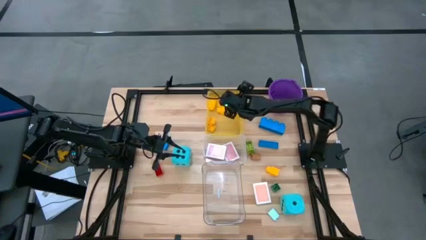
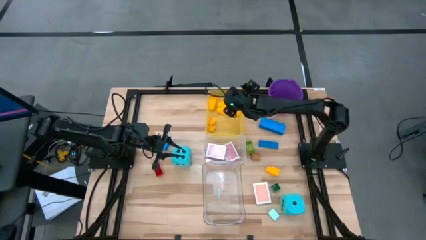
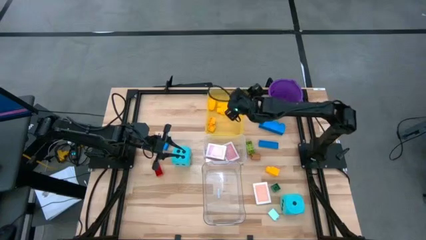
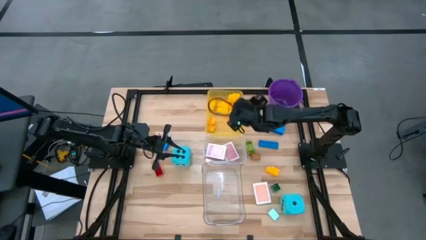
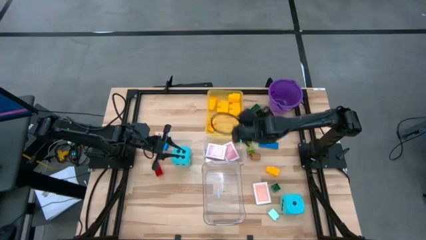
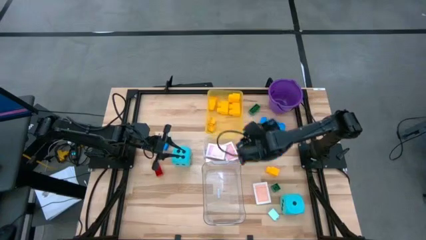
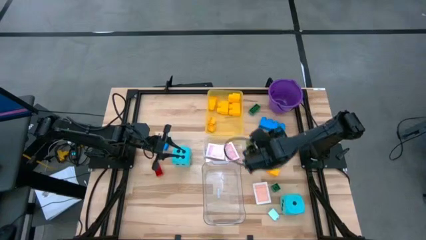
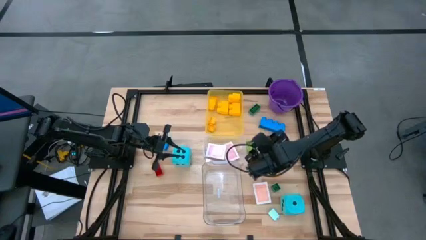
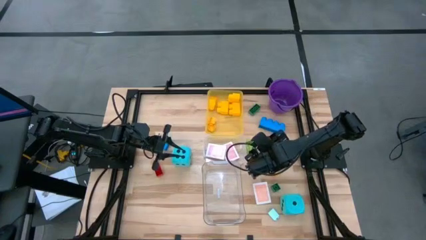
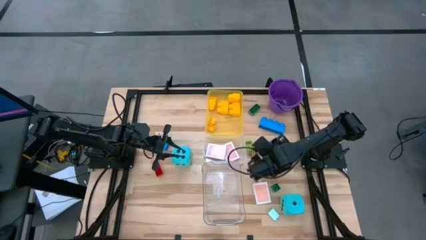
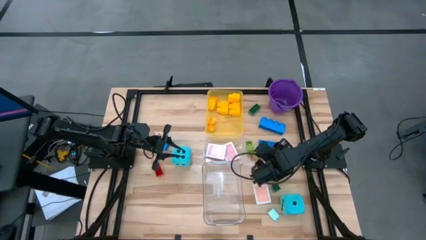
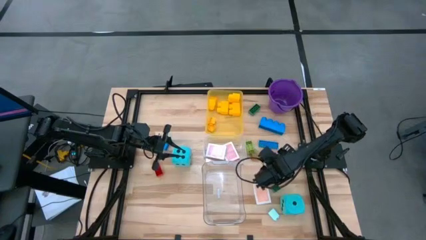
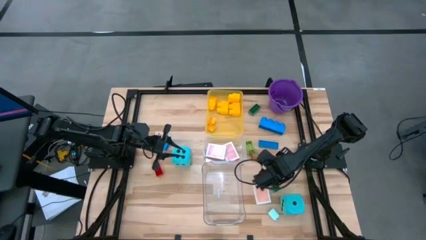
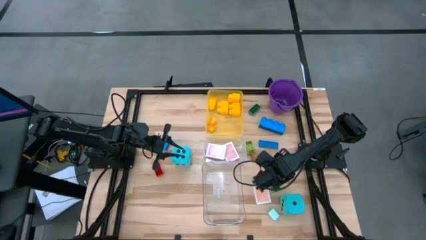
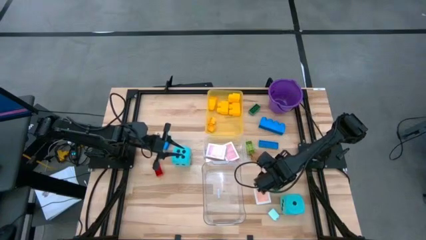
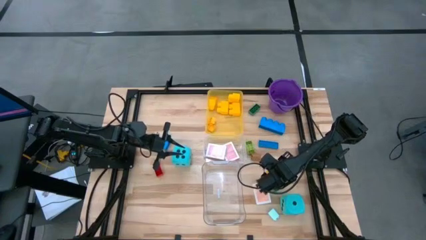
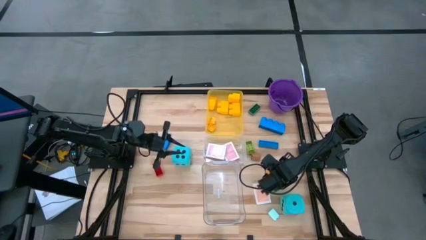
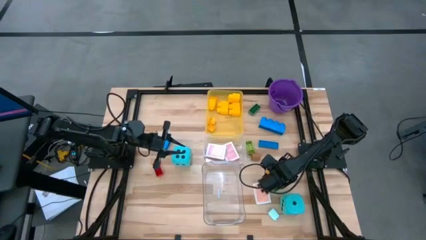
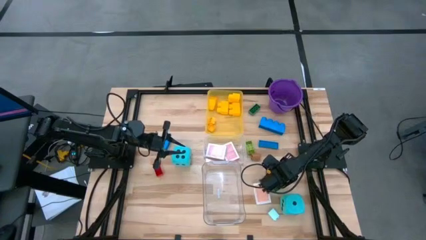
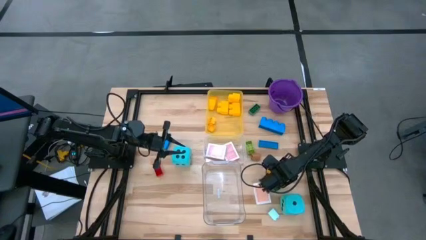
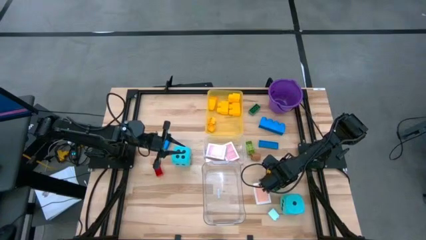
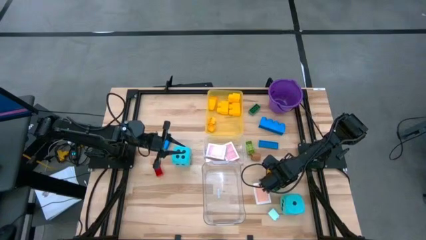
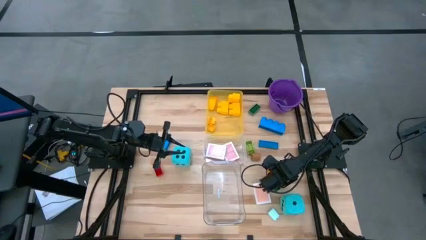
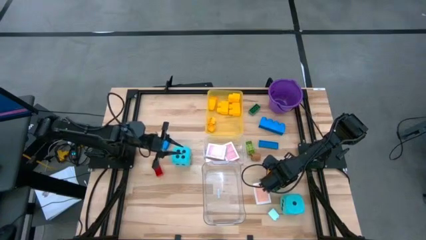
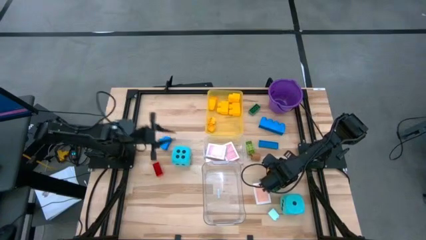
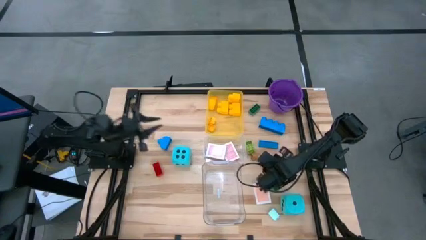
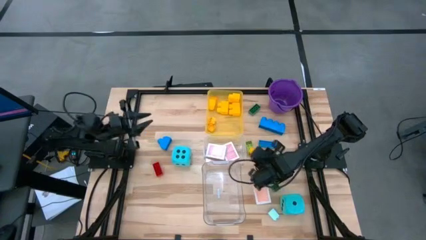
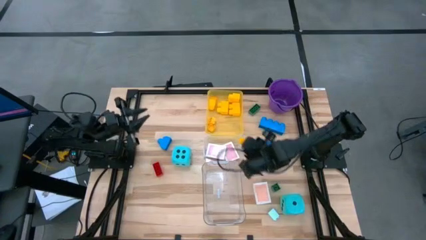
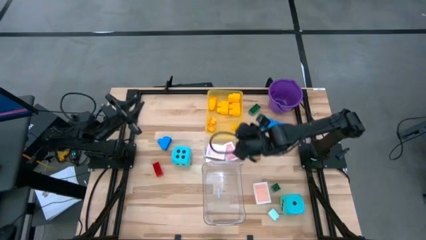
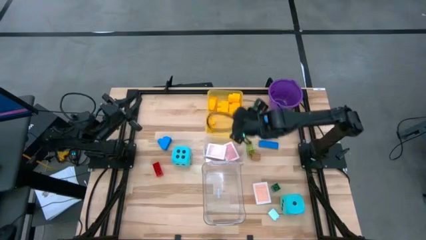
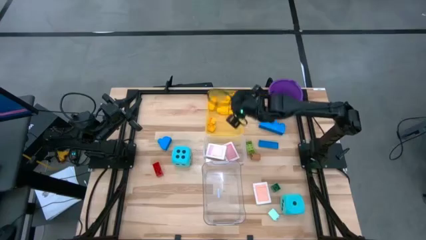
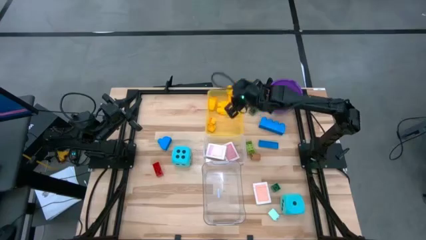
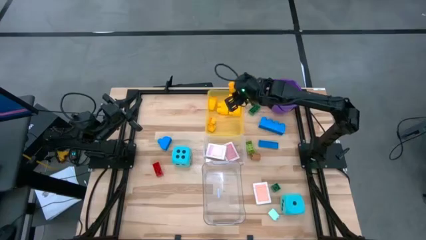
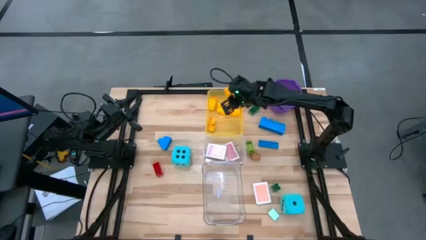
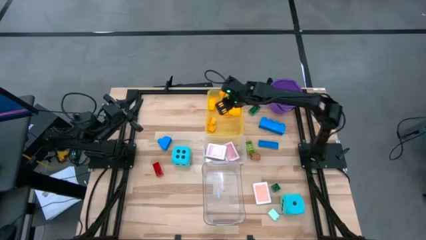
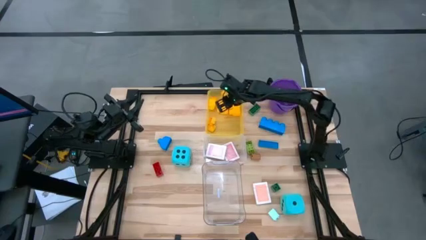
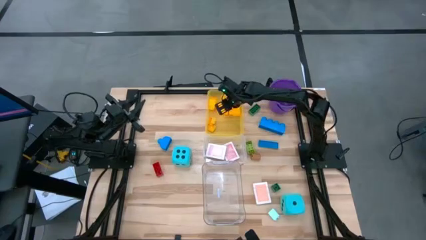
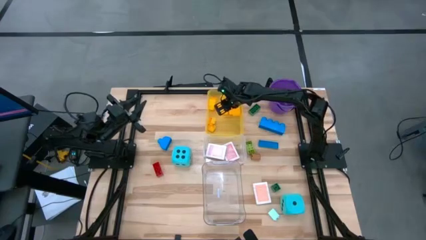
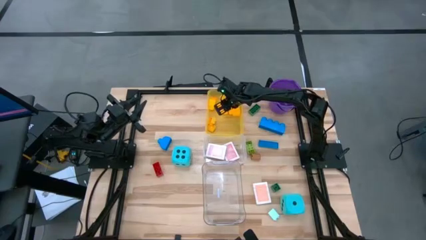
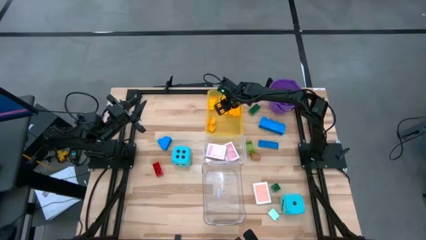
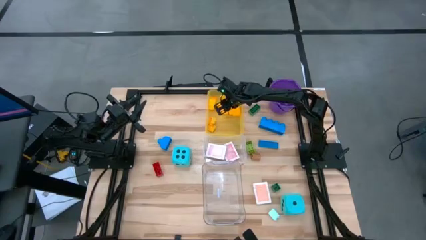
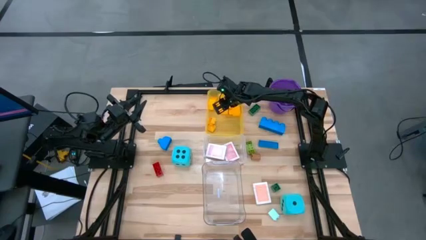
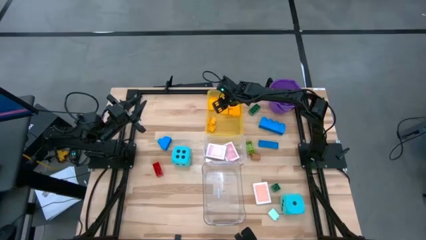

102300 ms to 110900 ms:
Task: Pick & Place Toys
Put the yellow game piece into the yellow bin

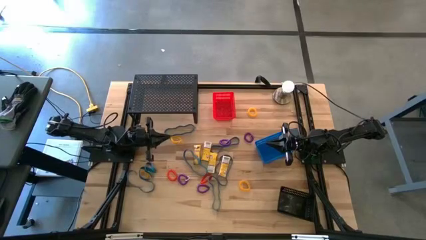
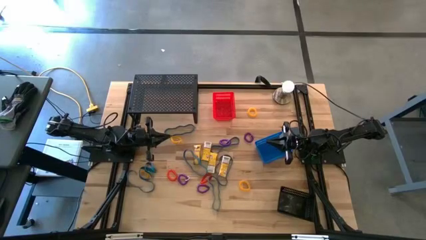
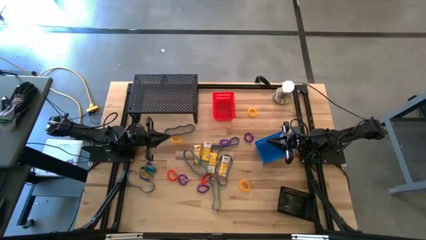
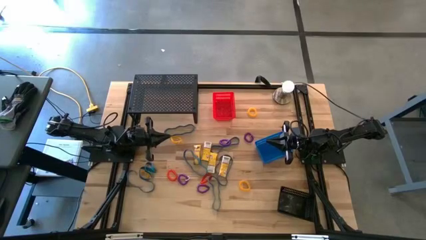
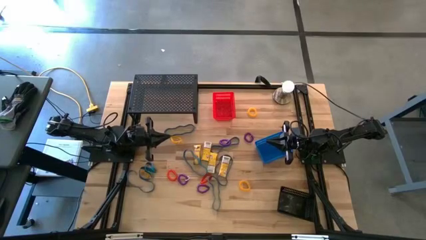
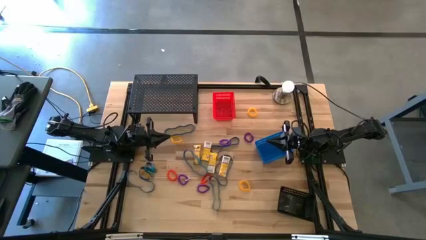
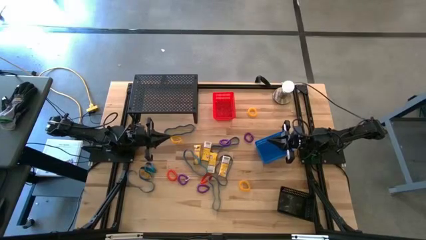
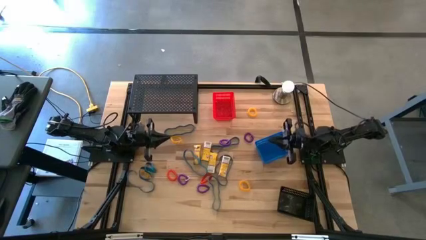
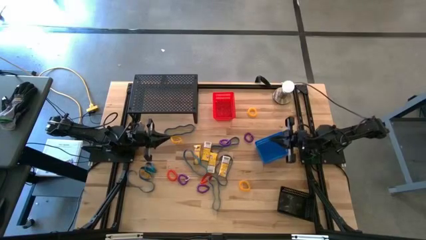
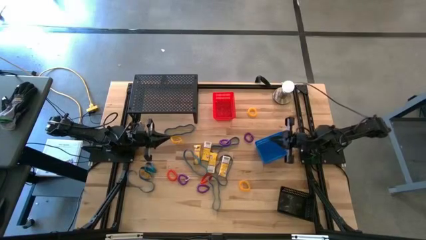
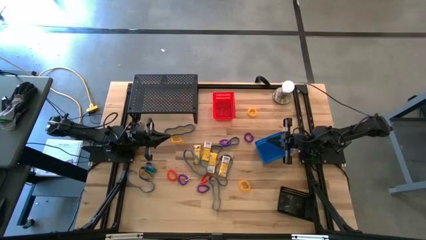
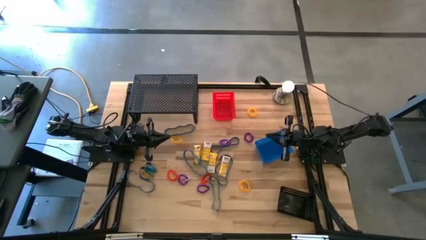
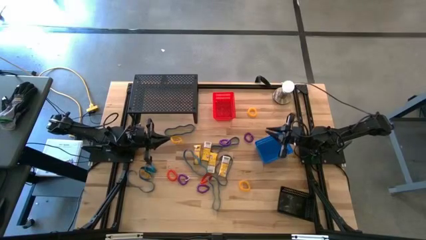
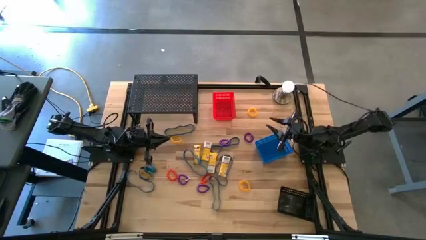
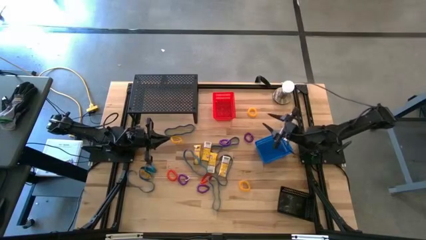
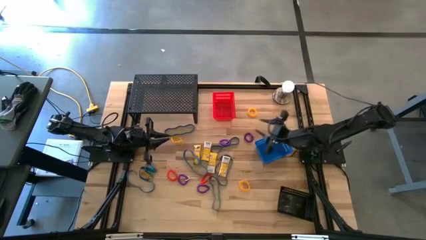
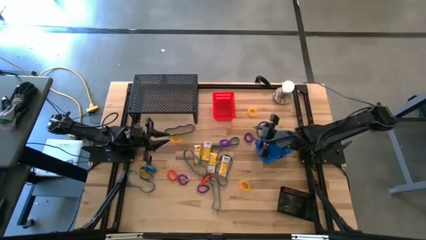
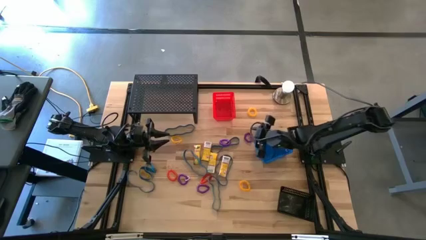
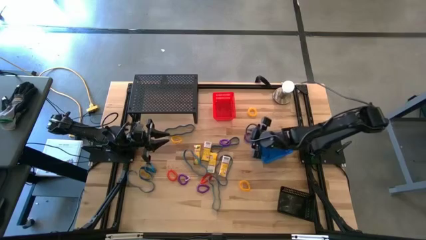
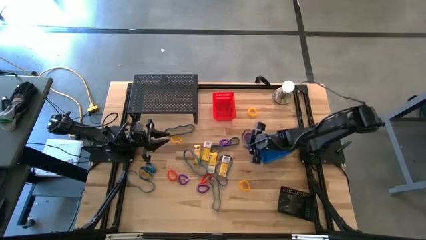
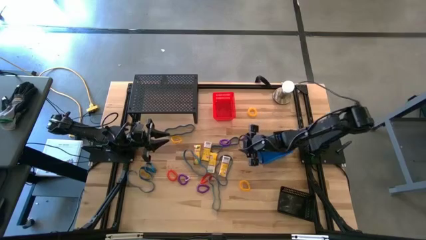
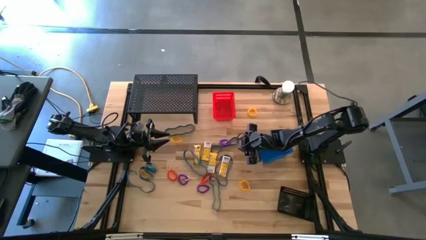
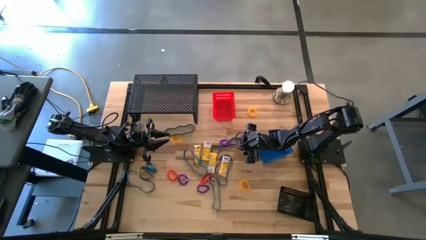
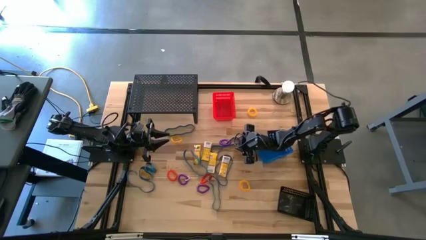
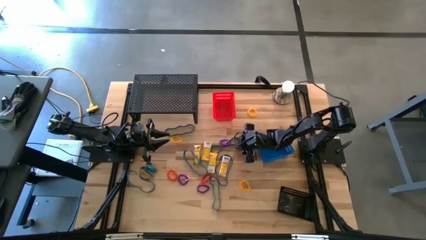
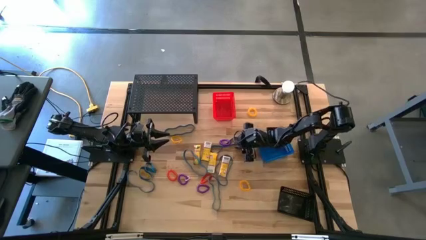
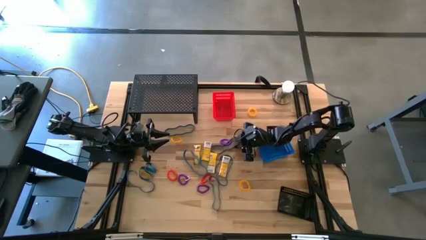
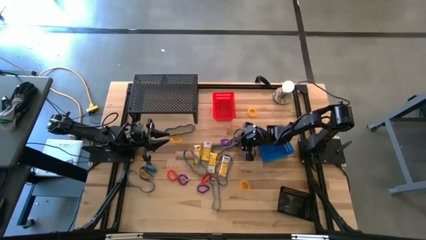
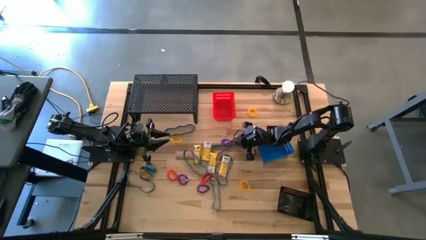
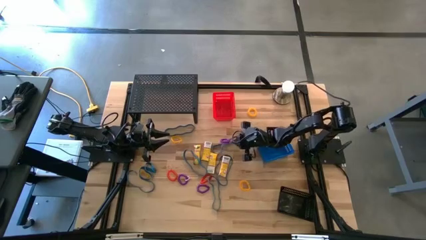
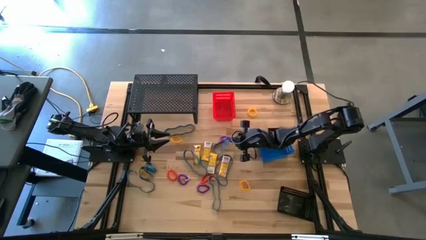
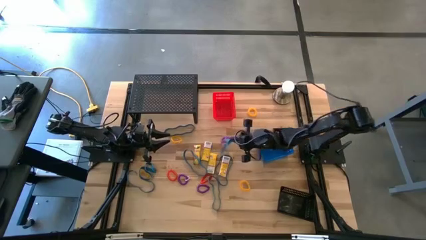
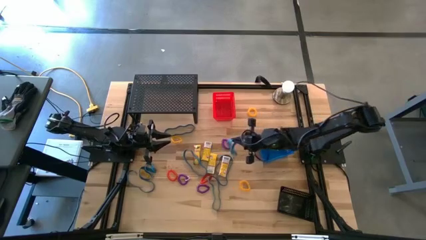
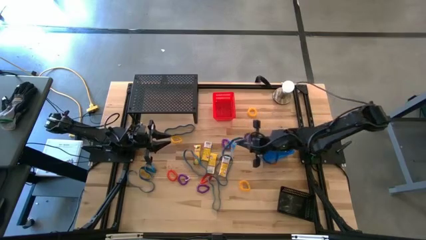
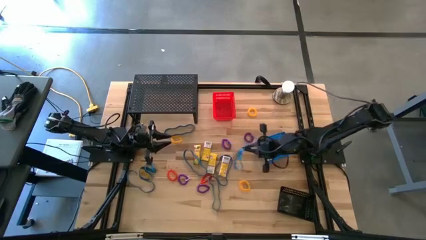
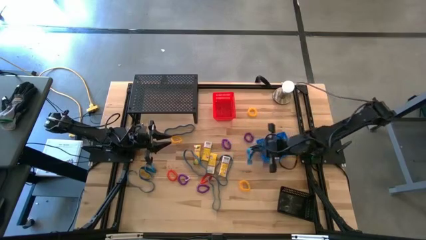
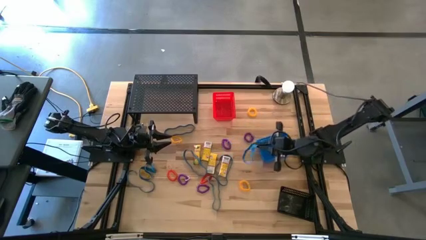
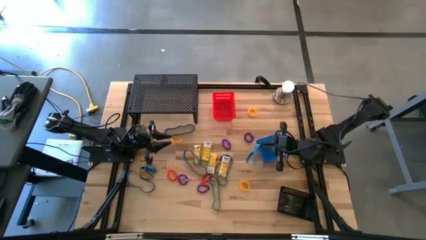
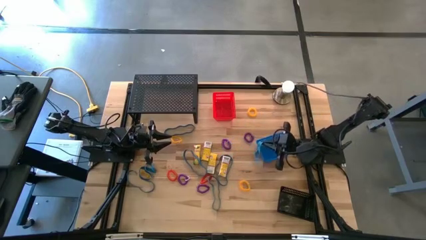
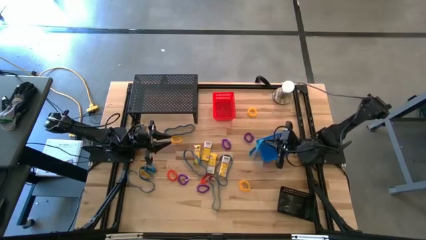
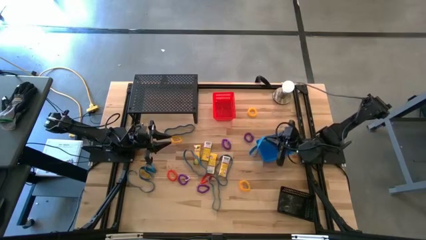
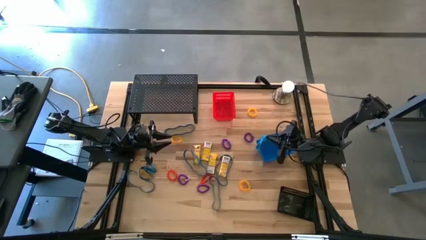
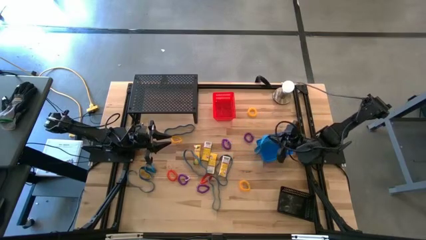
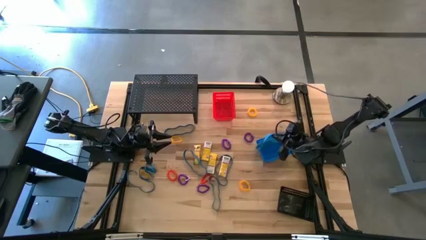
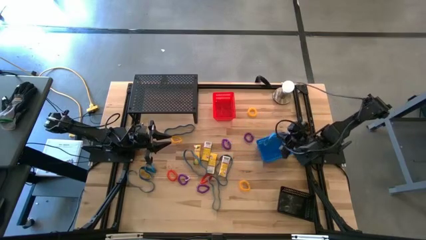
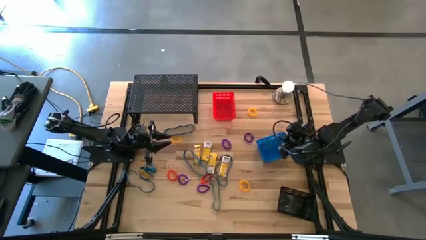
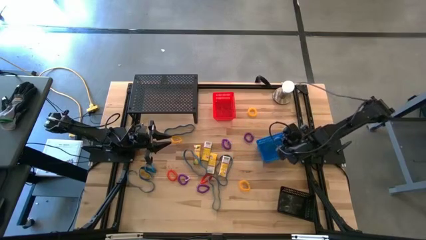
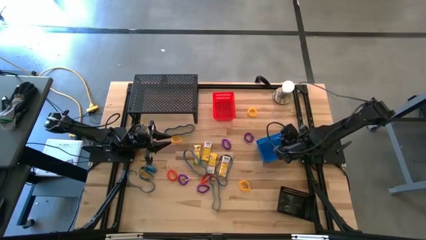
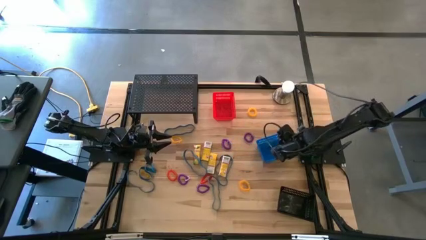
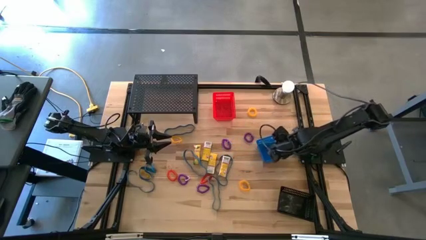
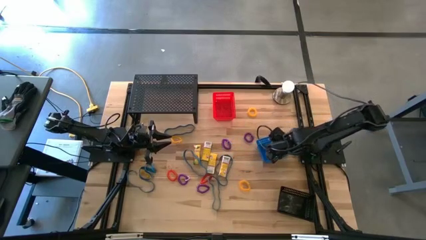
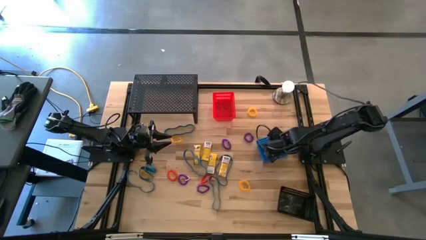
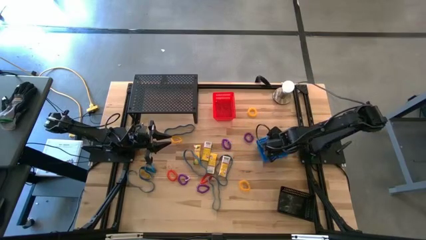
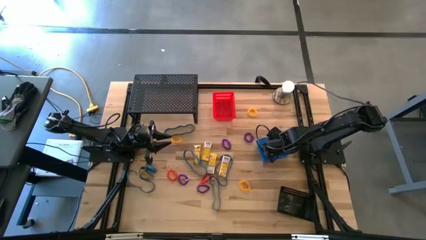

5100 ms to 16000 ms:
Task: Pick & Place Office Desk Supplies
Put the blue rubber band into the blue bin
